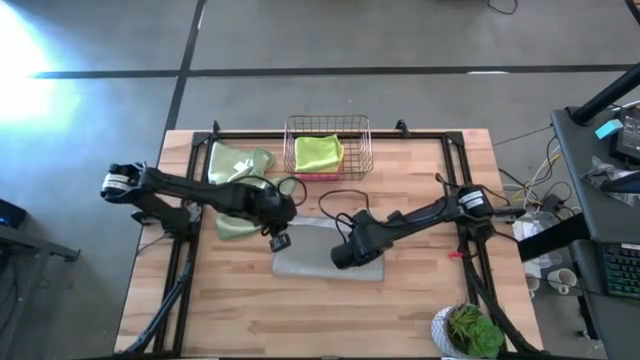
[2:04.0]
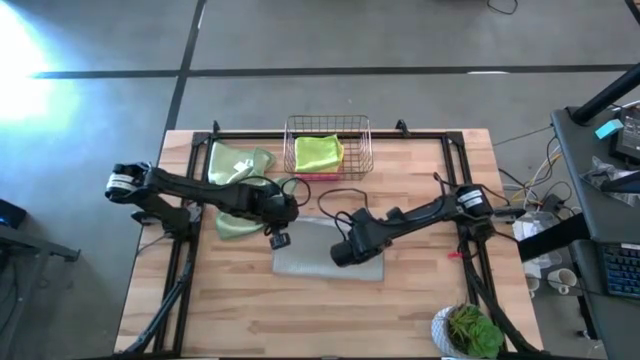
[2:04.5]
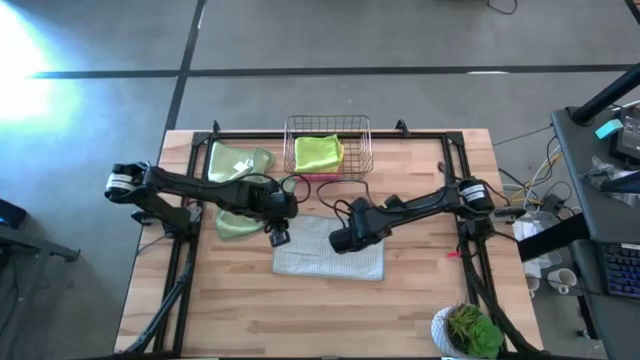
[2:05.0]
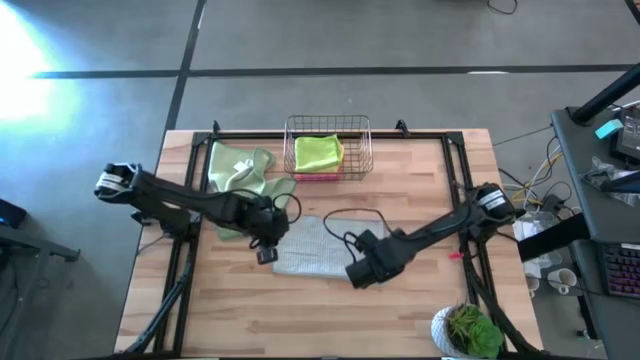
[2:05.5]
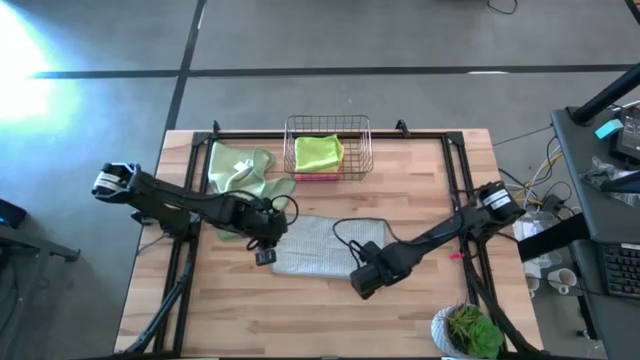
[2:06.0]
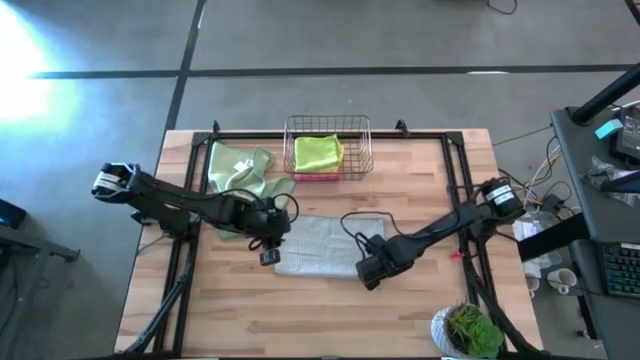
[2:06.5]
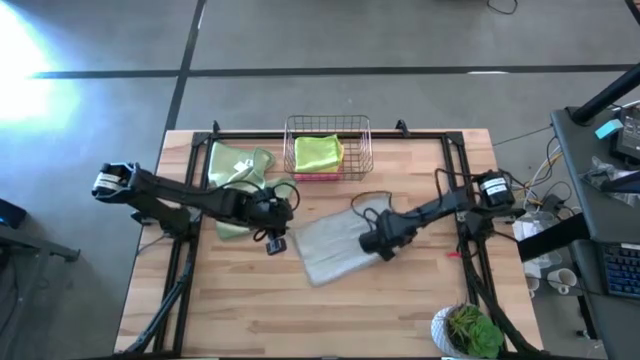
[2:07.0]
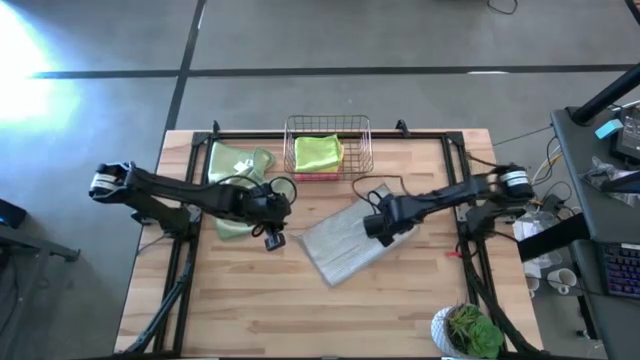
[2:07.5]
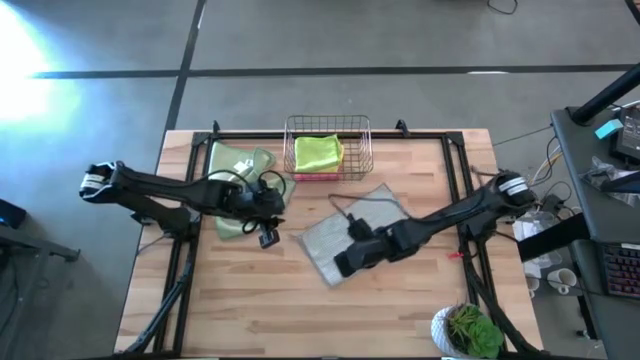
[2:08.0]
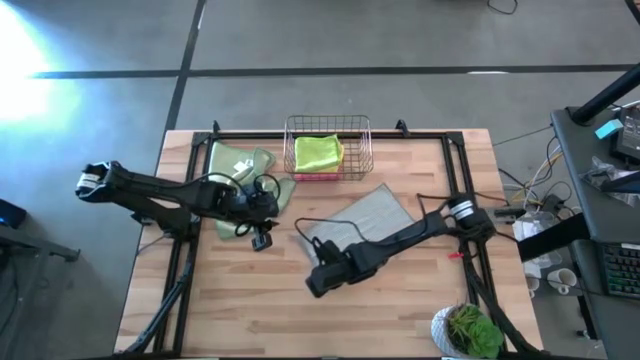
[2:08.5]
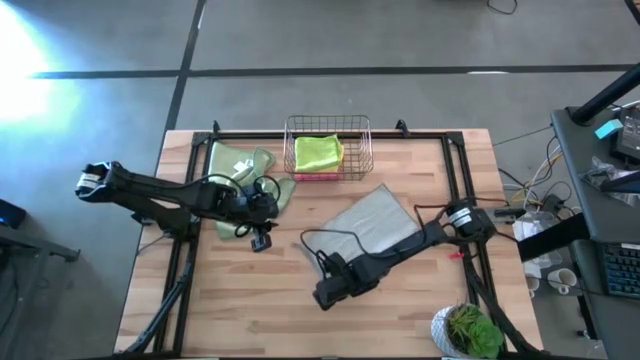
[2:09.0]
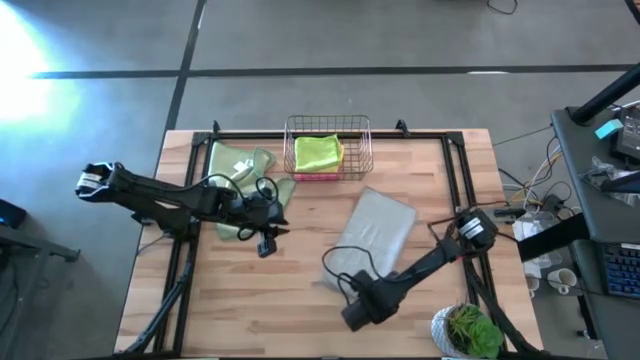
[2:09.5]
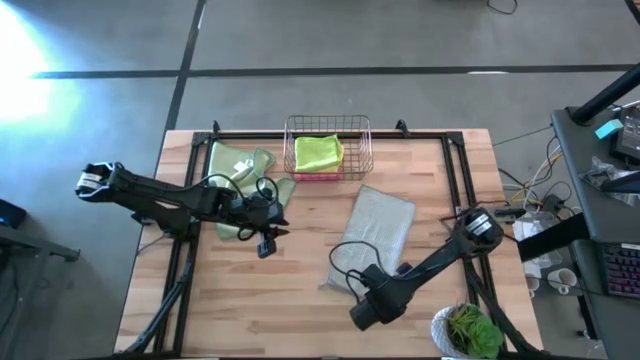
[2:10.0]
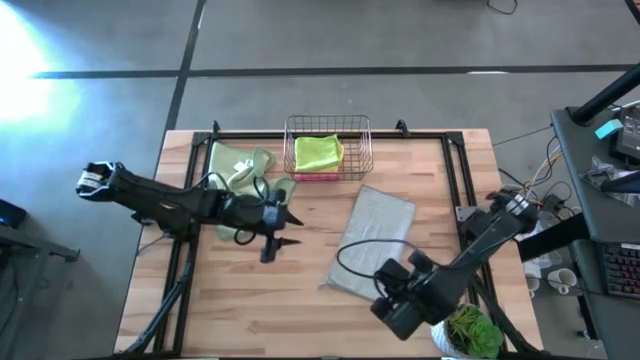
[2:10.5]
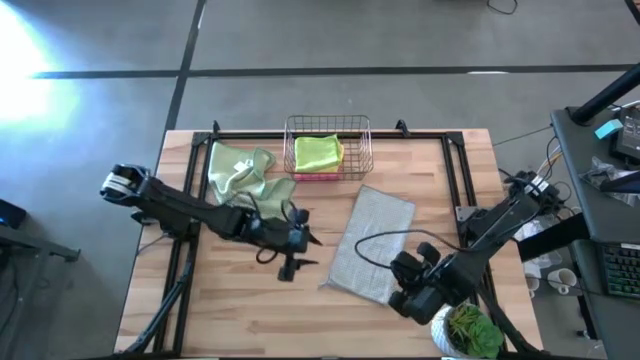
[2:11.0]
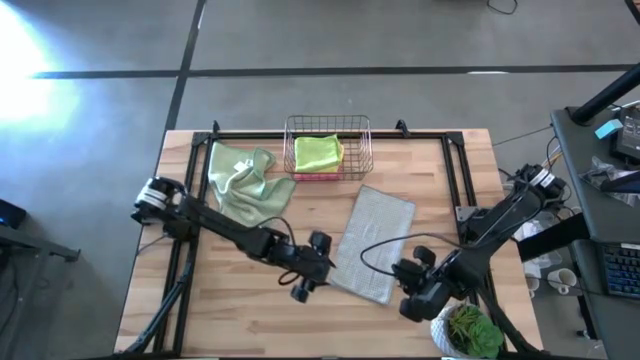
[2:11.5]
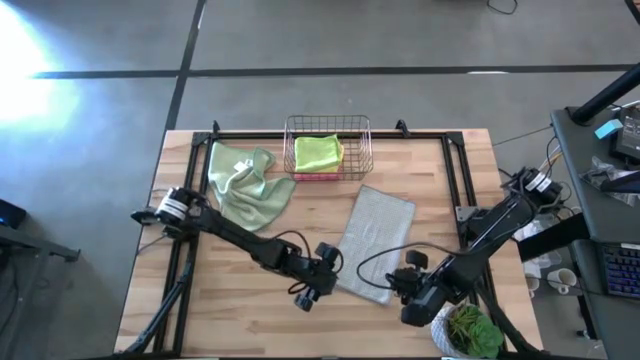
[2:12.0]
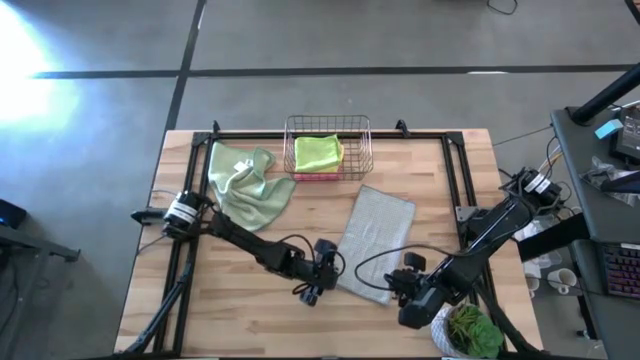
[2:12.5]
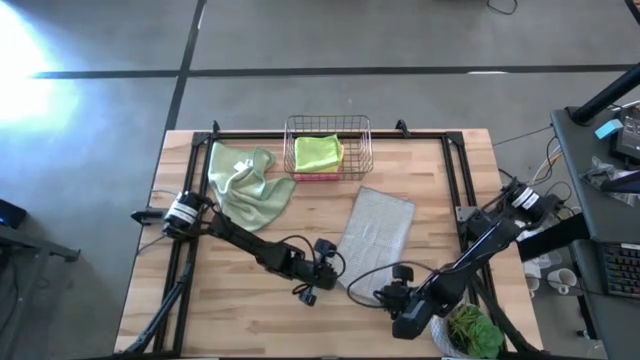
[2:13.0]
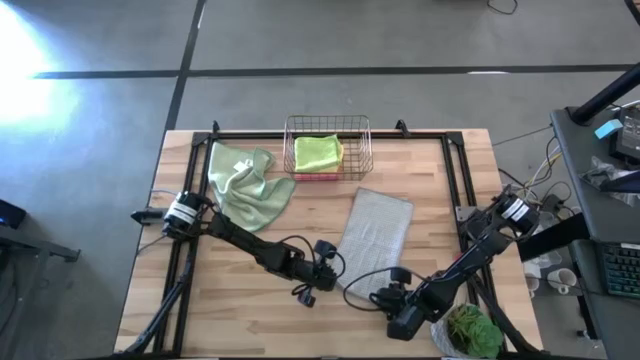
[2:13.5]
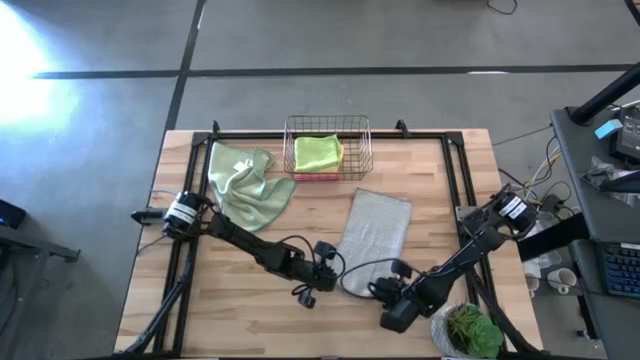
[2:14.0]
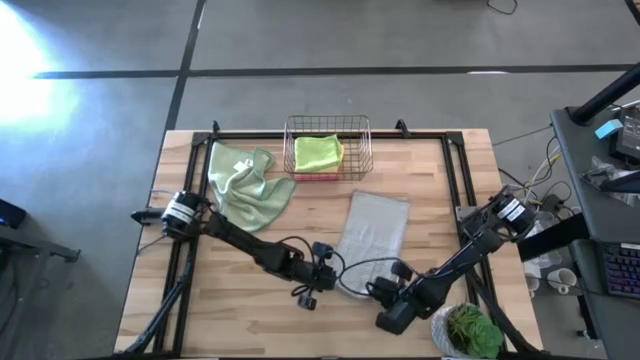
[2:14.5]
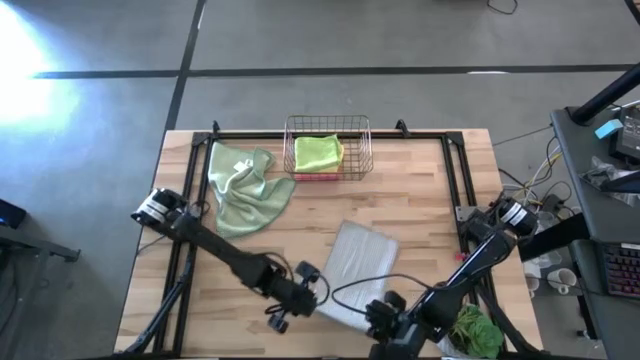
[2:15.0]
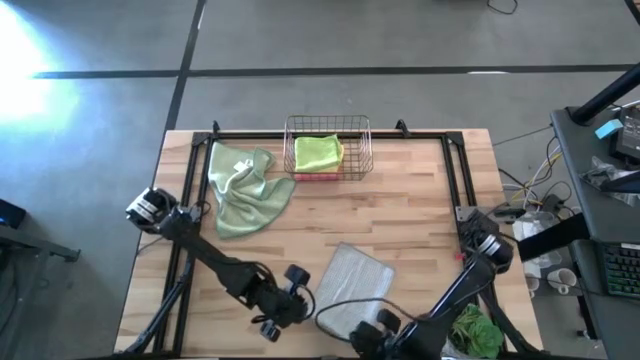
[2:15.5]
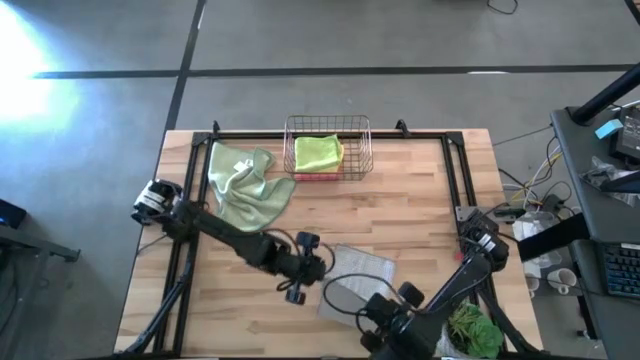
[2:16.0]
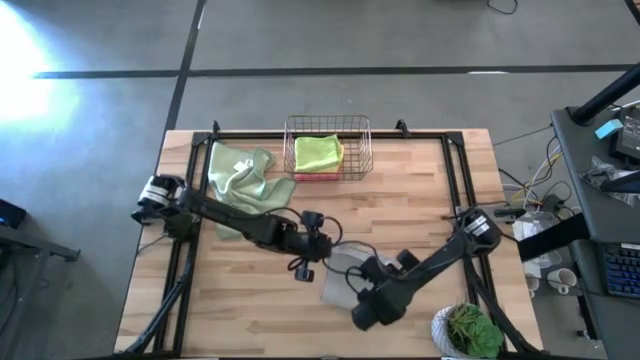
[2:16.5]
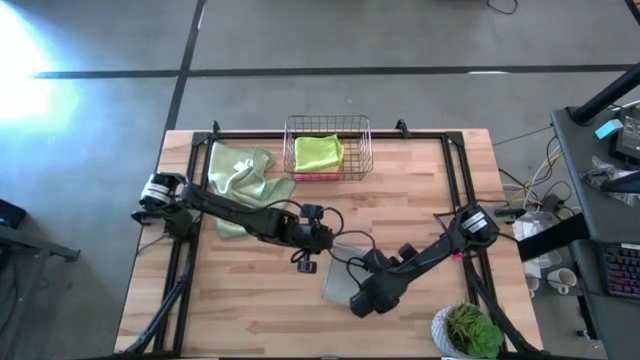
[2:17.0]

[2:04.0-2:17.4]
Task: Fold microfiber towels
Fold the gray microfiber cloth

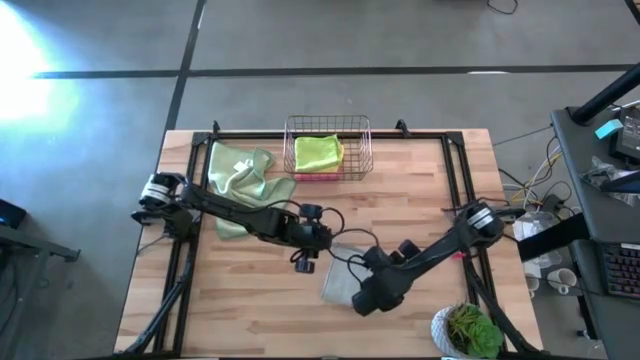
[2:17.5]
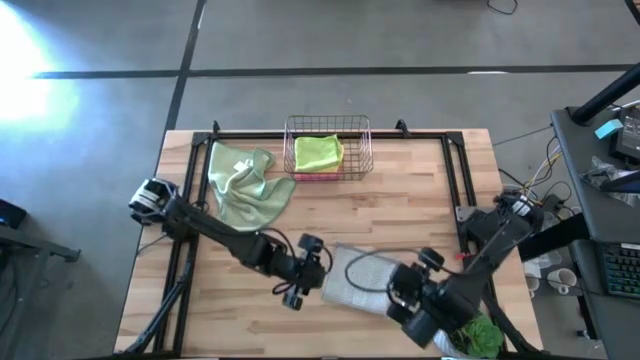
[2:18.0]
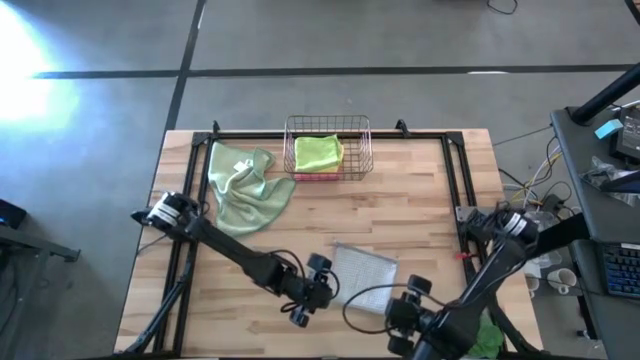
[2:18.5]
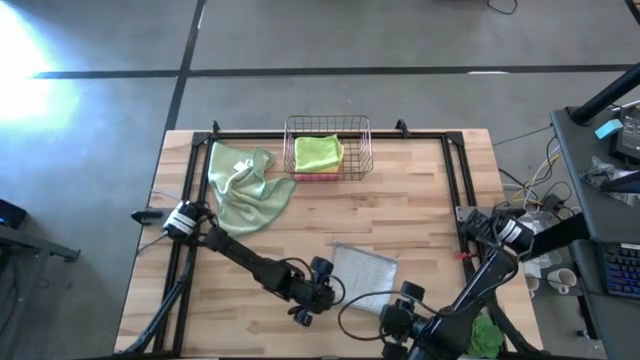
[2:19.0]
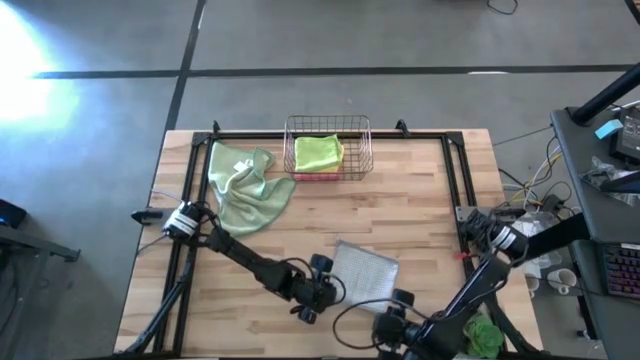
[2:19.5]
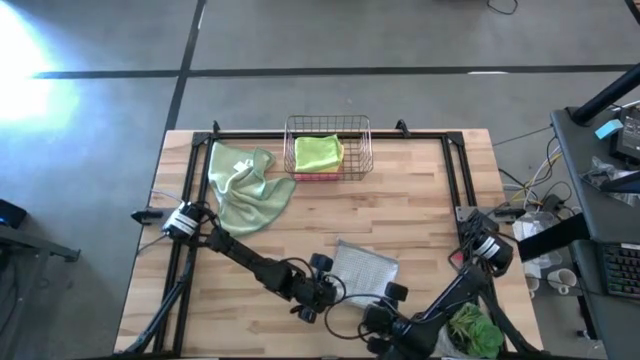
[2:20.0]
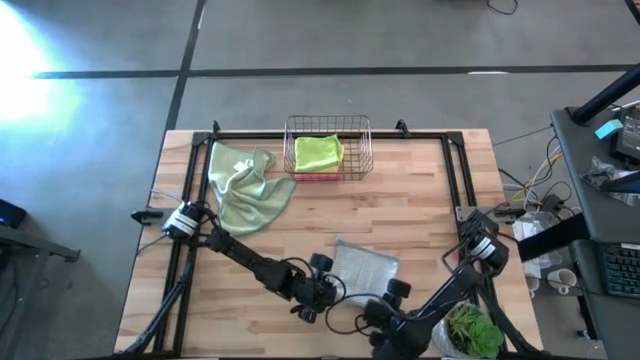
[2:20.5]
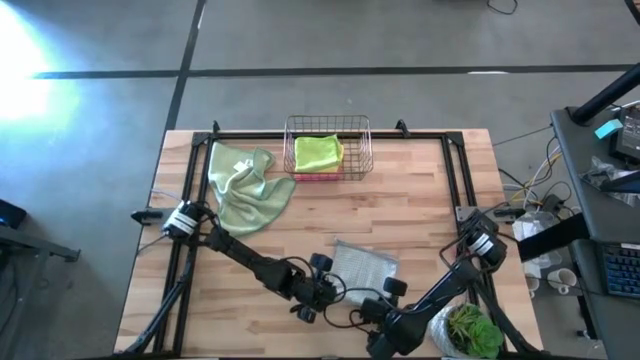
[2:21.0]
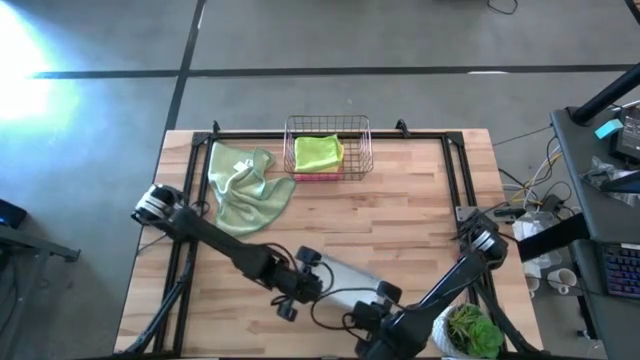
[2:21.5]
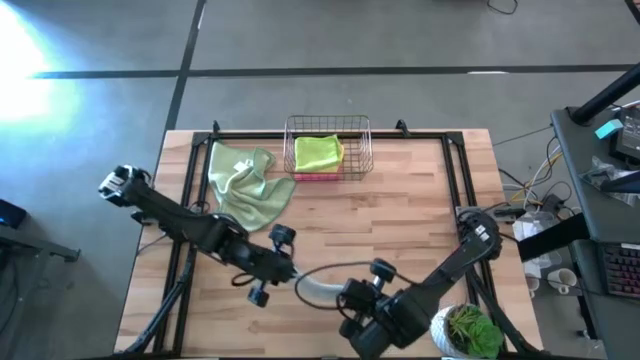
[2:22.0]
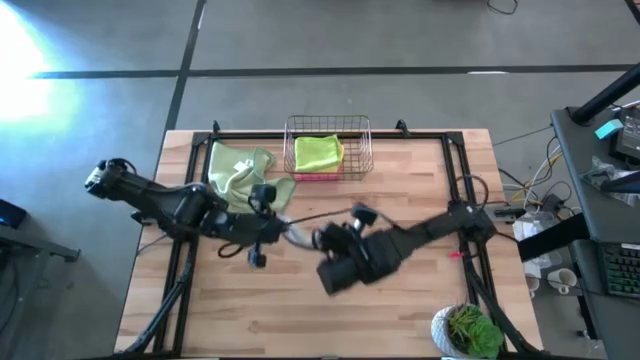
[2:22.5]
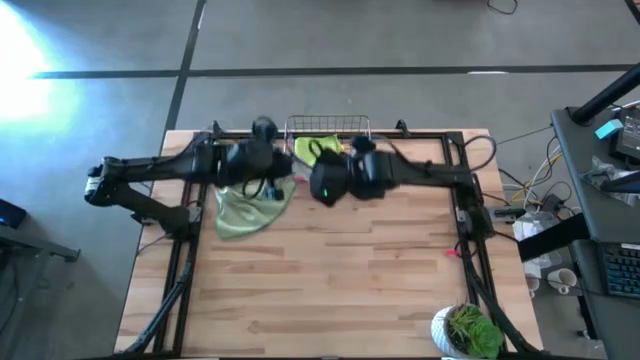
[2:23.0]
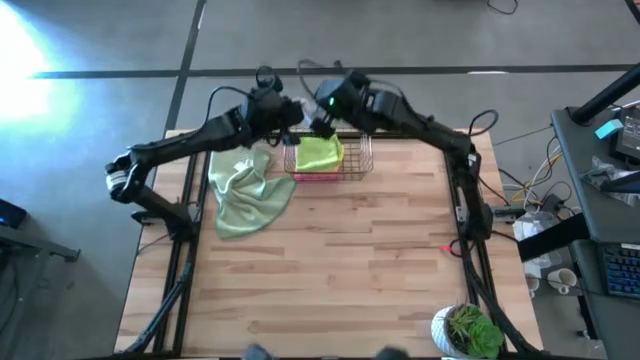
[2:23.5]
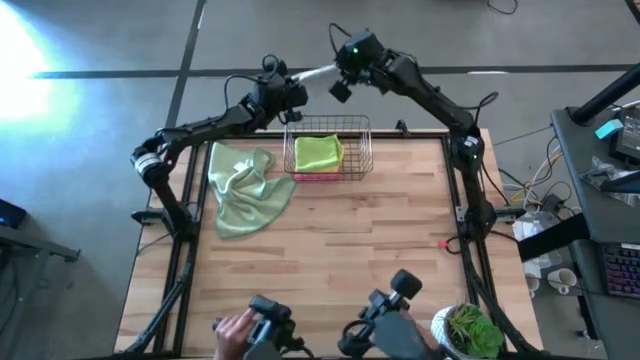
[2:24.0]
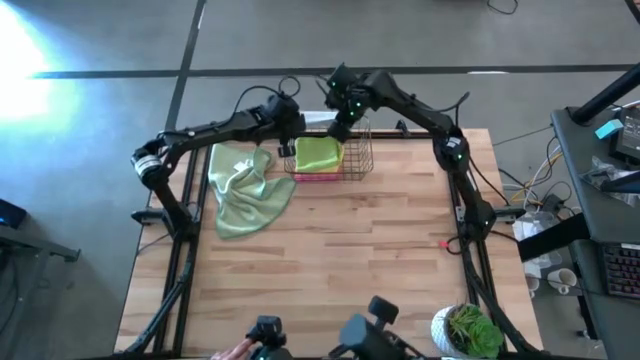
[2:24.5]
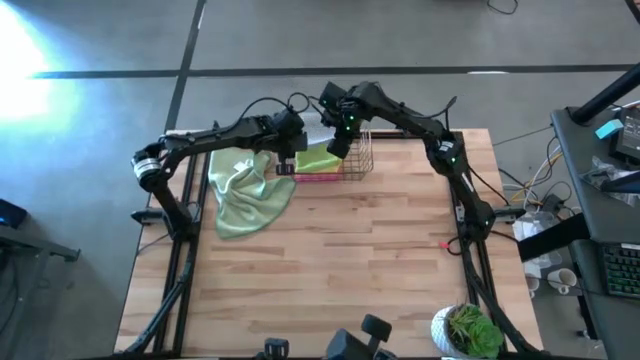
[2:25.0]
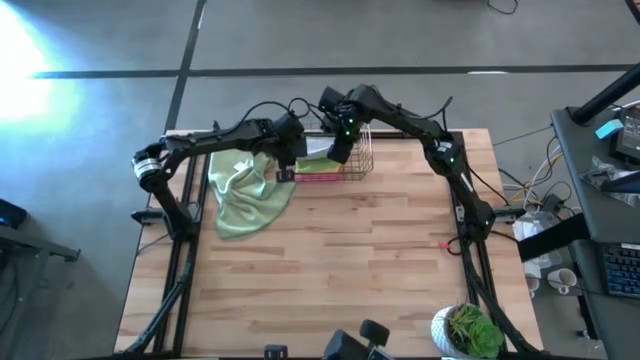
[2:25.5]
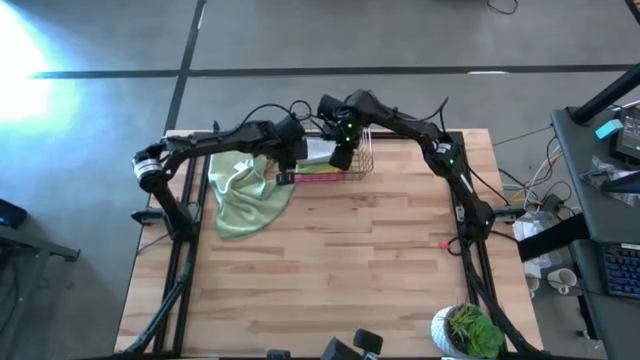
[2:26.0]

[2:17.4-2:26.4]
Stack the folded gray microfiber cloth on top of the green microfiber cloth in the wire basket
